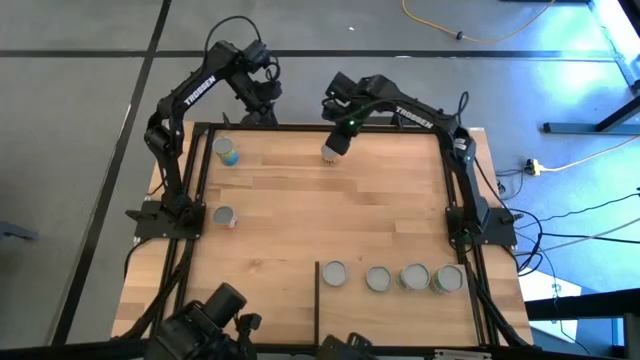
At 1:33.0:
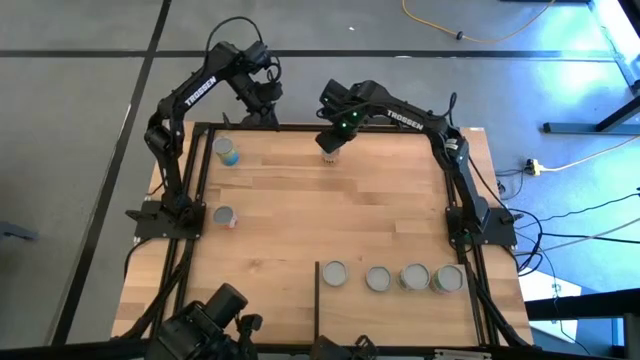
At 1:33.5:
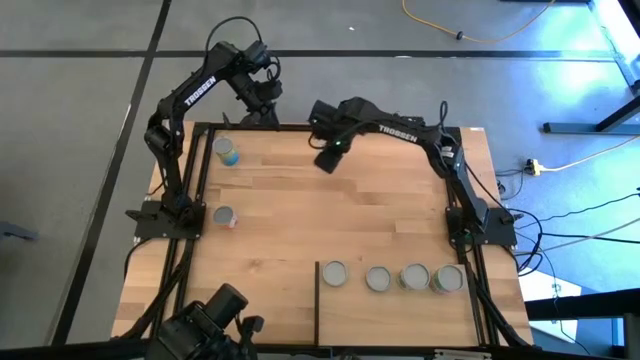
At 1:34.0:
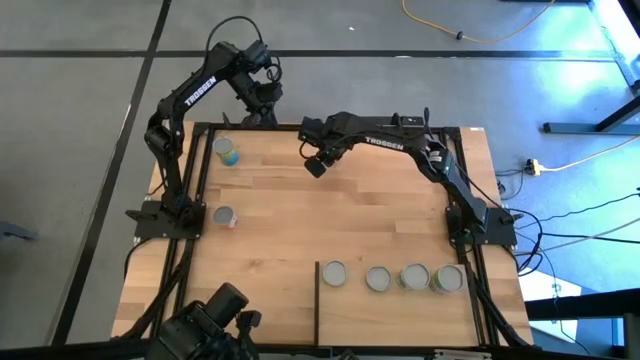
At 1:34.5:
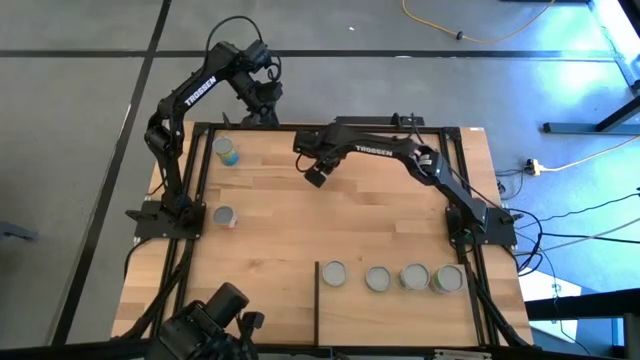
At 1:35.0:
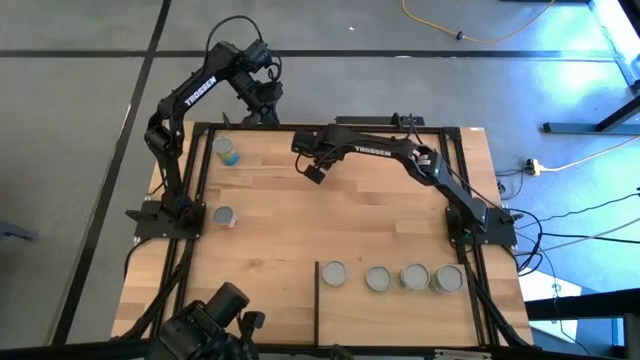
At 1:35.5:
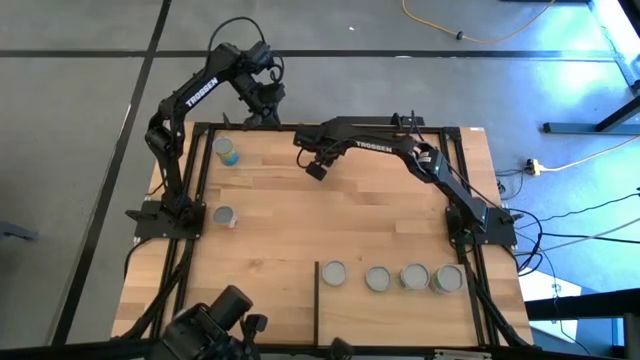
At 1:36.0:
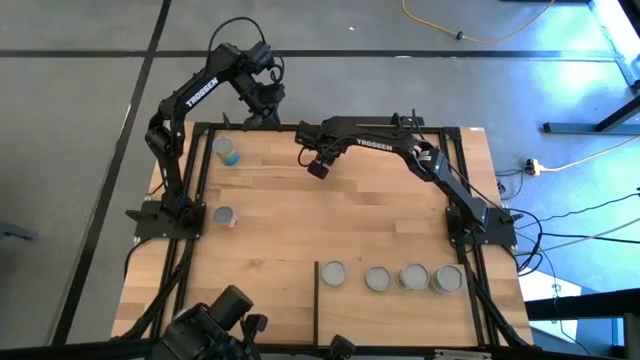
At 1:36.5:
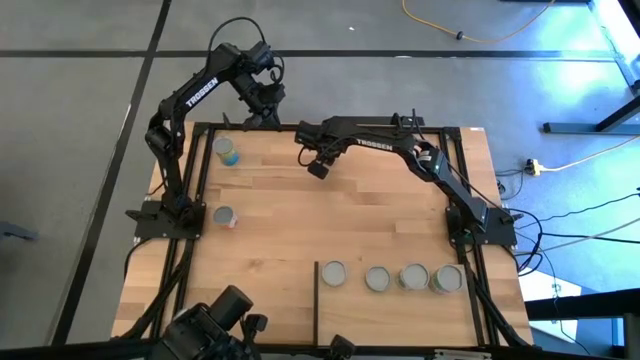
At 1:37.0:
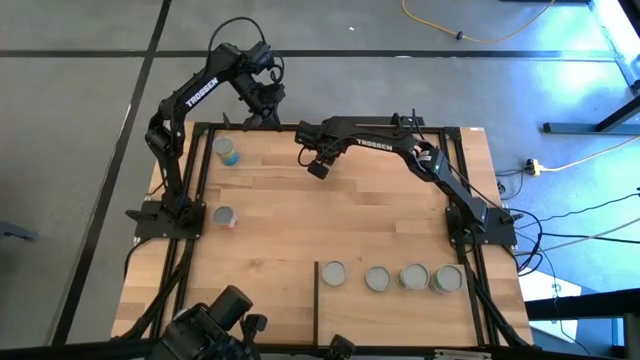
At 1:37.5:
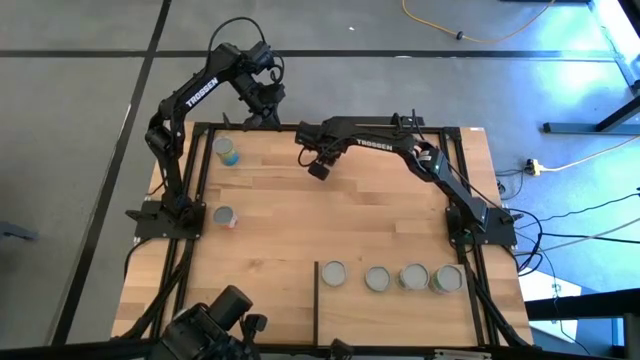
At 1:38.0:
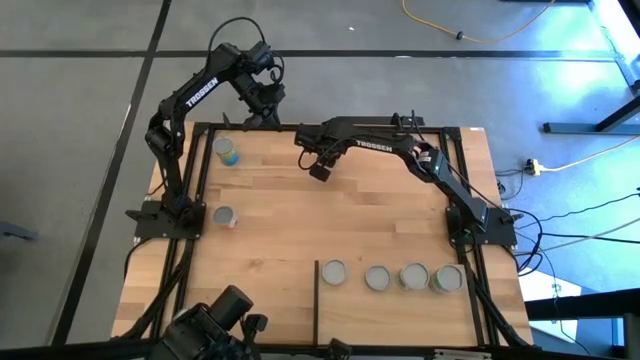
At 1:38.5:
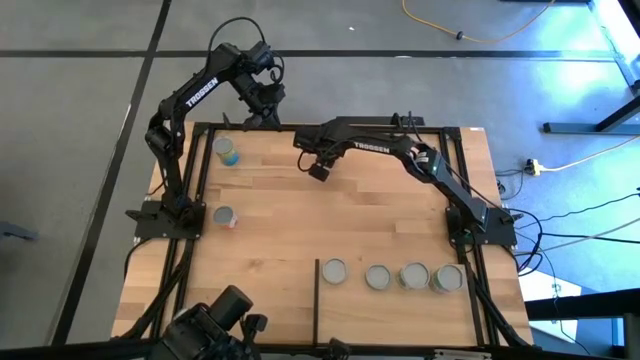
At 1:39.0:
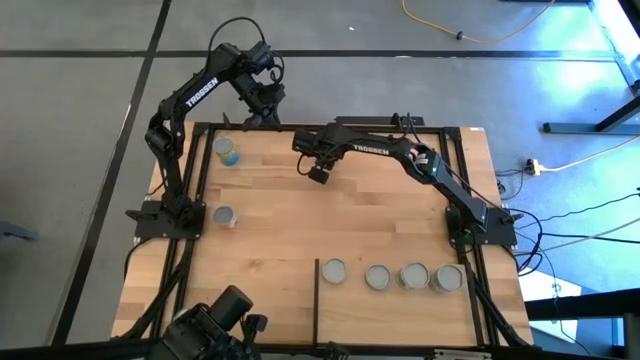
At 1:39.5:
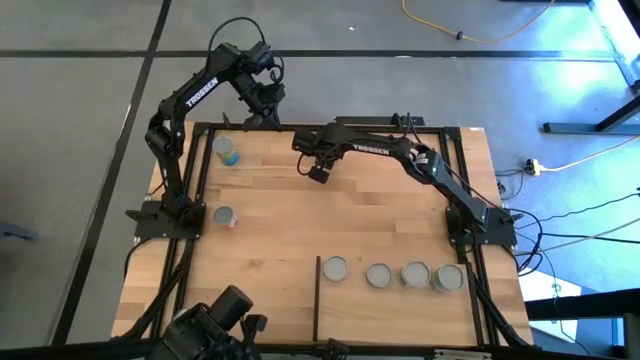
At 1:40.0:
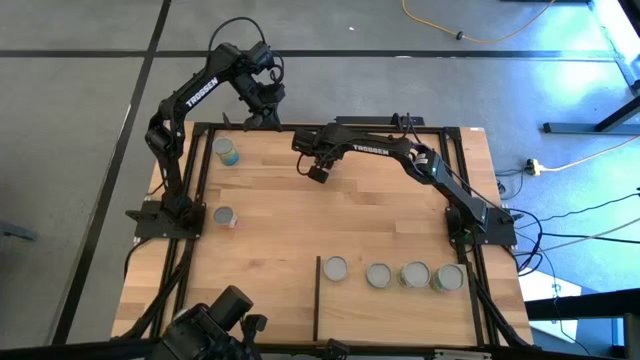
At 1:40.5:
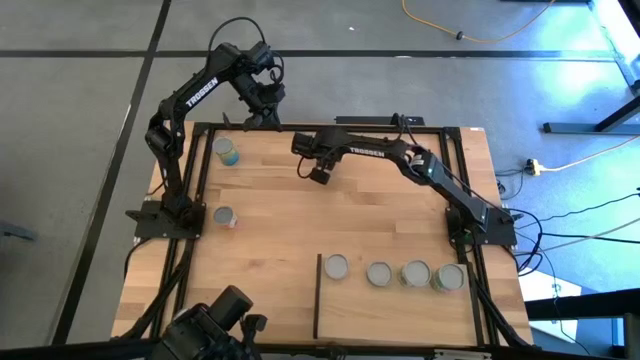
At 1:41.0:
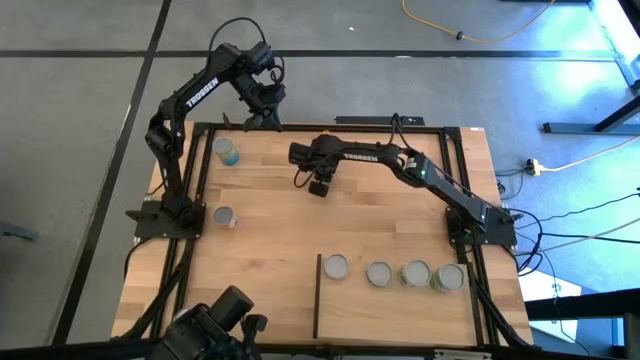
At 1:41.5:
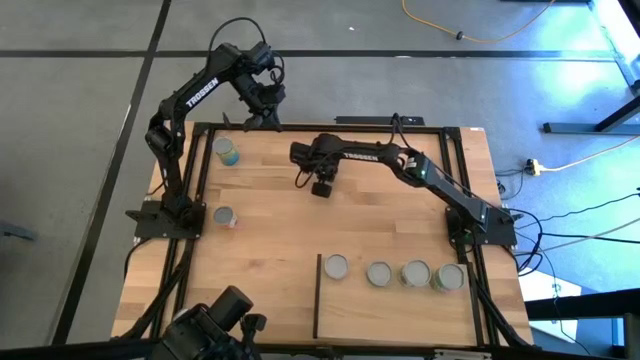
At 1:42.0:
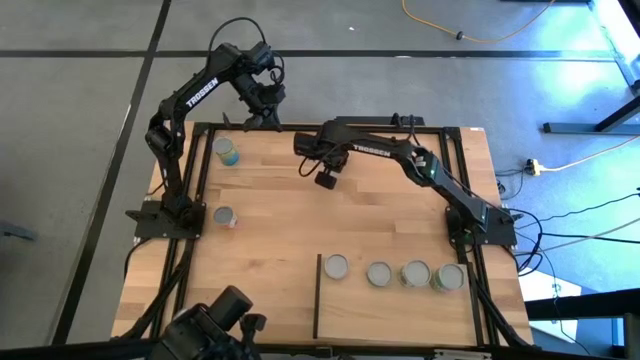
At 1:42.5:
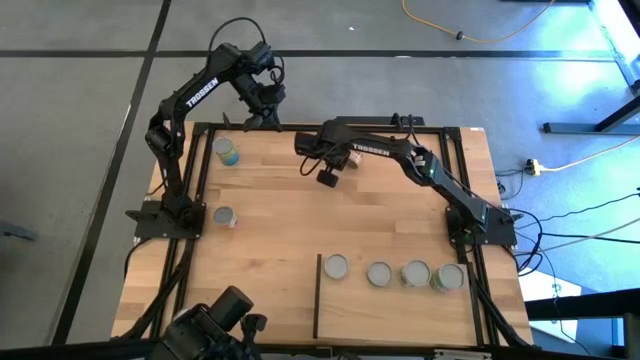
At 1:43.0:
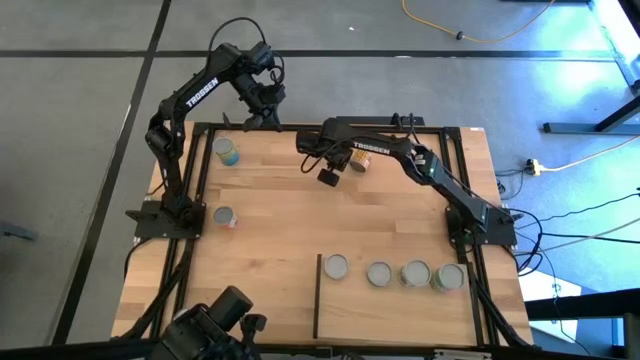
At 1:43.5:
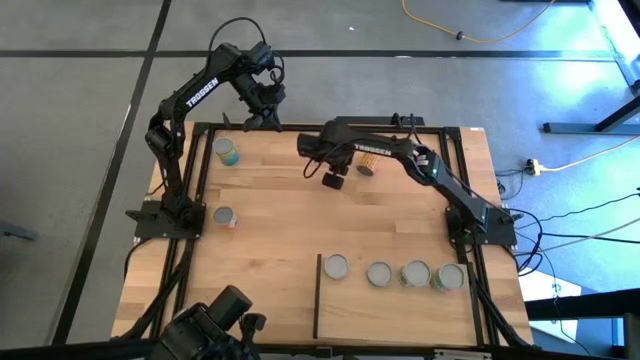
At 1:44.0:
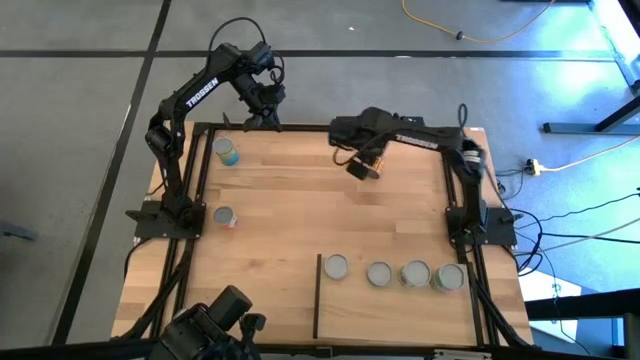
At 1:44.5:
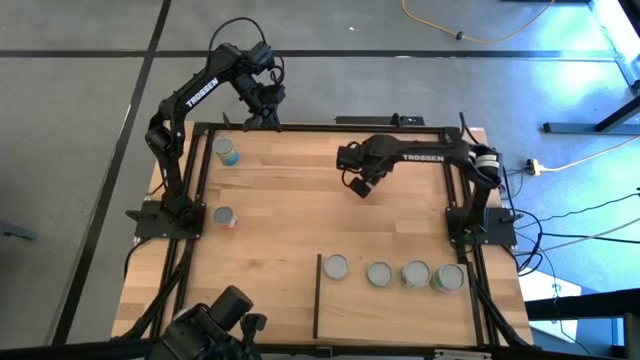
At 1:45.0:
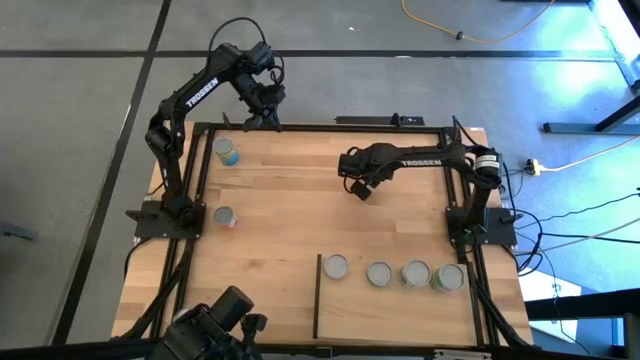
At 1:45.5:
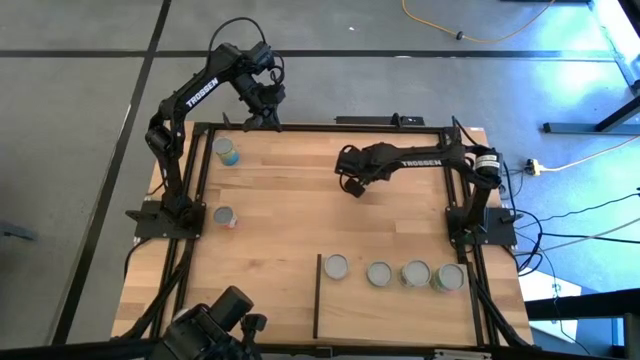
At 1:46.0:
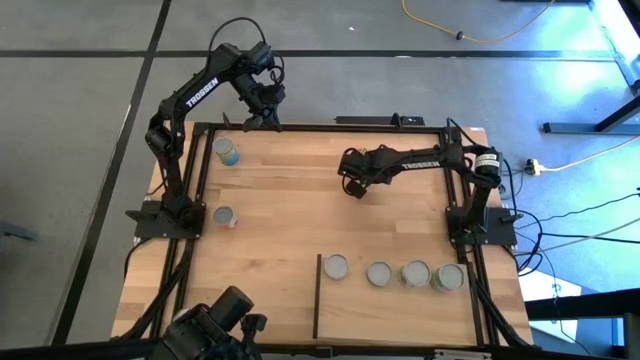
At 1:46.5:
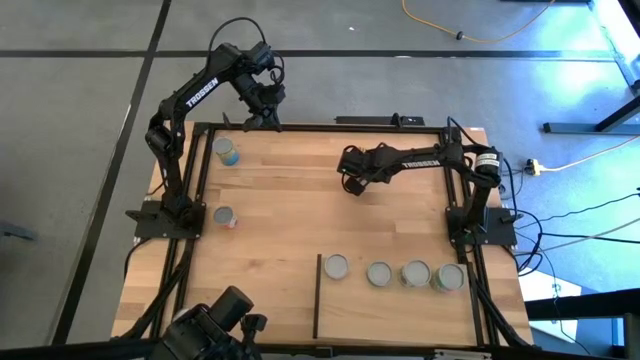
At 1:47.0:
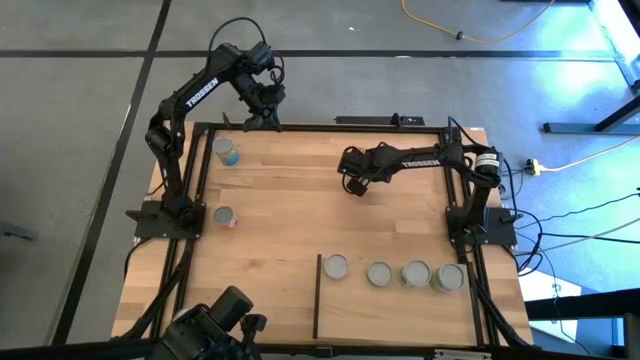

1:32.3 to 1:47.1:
Task: Pick and place cans onto a shelf
Put the yellow canned black beans on the shelf

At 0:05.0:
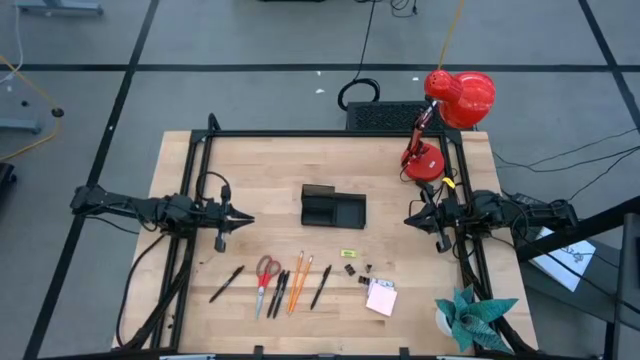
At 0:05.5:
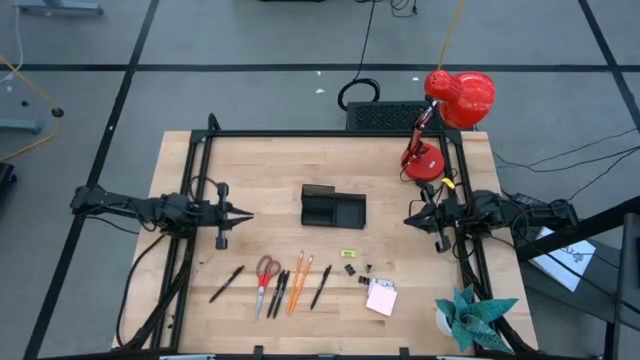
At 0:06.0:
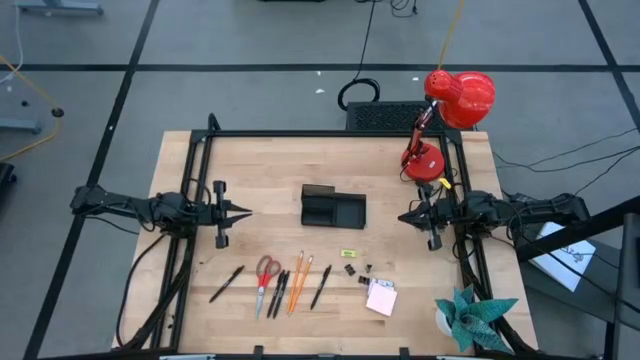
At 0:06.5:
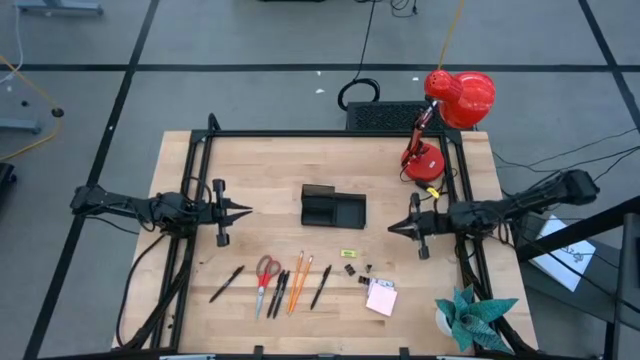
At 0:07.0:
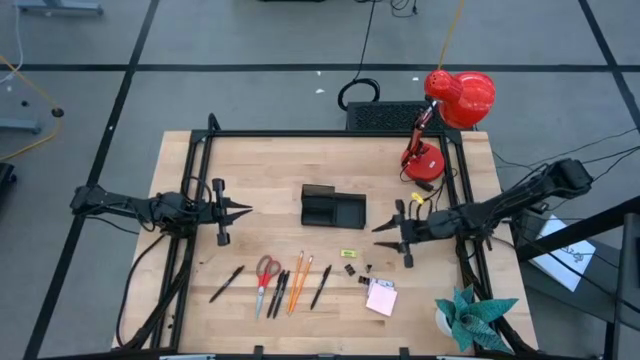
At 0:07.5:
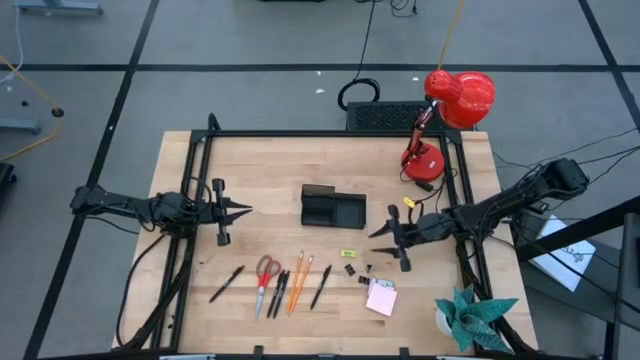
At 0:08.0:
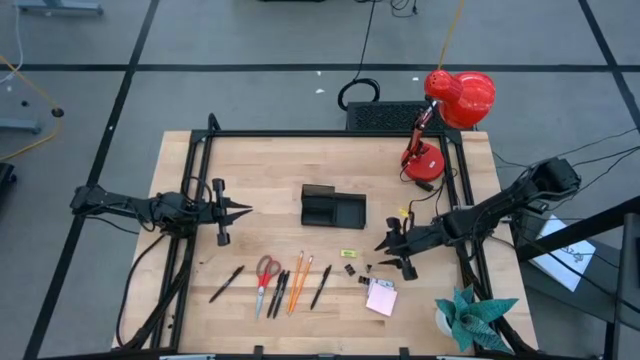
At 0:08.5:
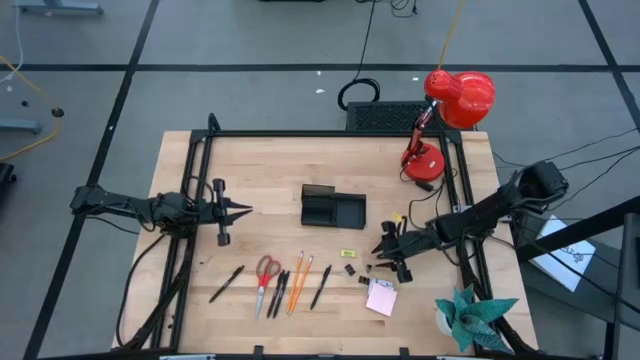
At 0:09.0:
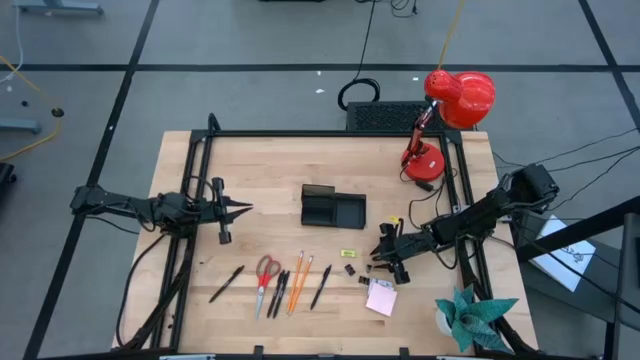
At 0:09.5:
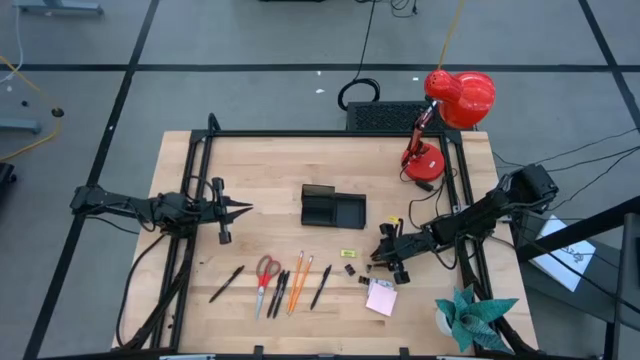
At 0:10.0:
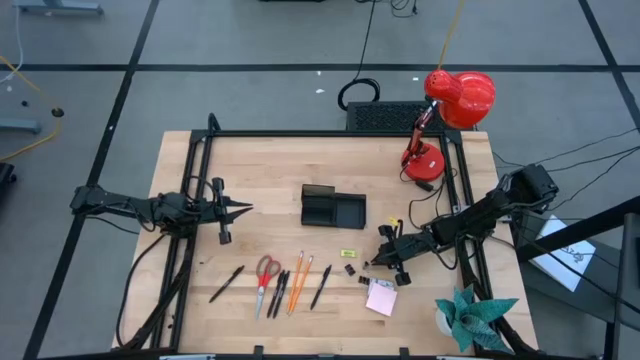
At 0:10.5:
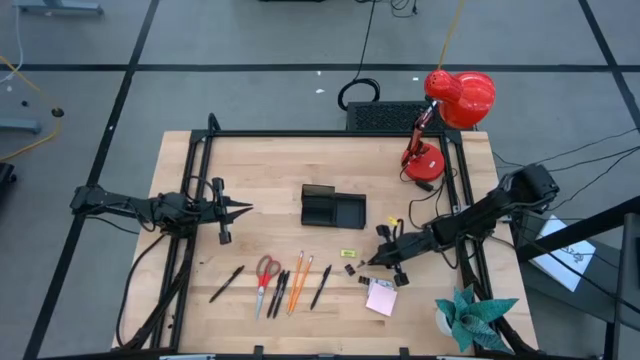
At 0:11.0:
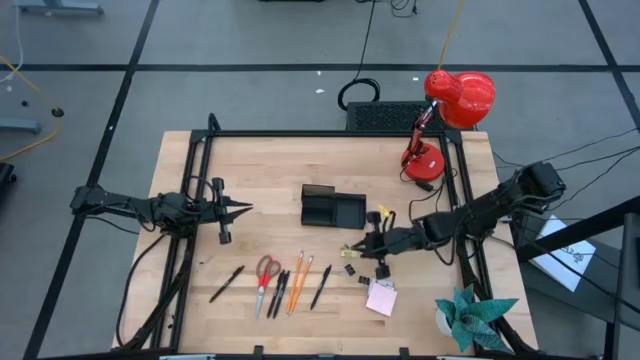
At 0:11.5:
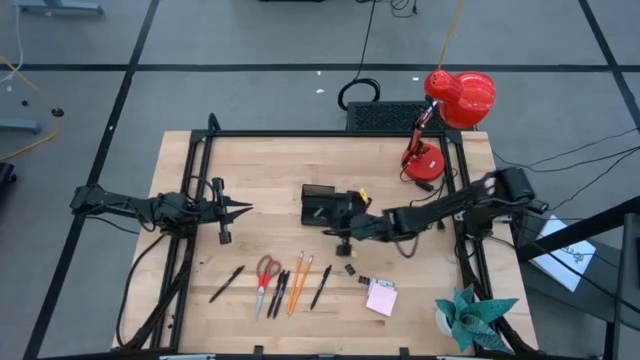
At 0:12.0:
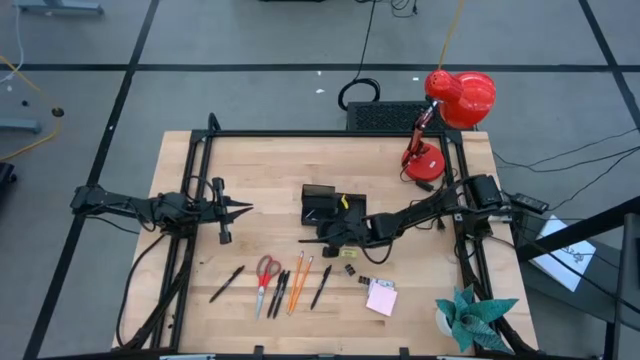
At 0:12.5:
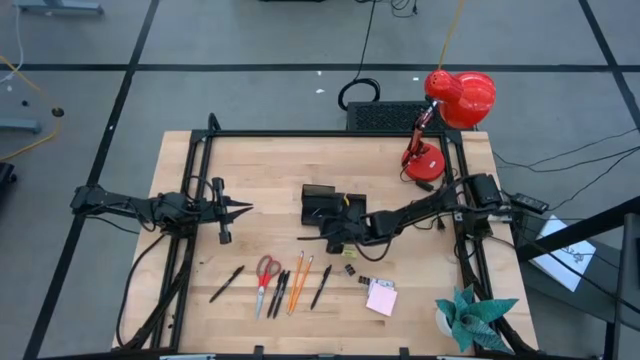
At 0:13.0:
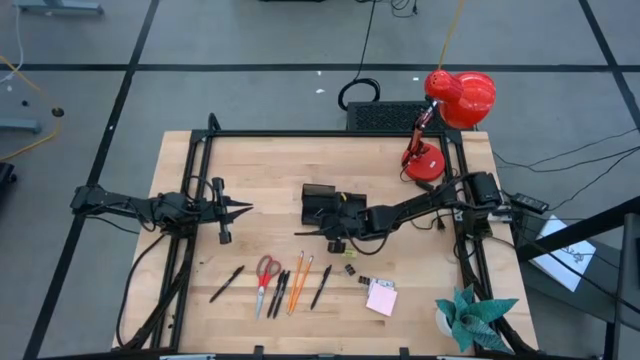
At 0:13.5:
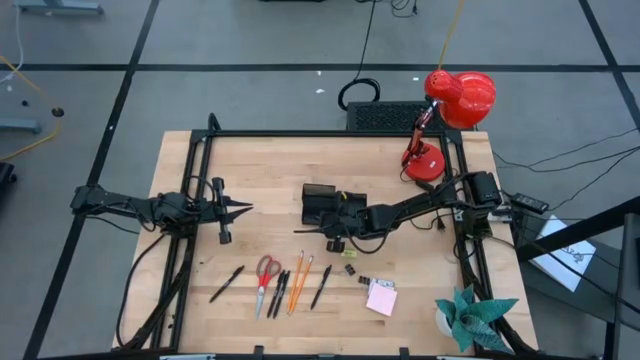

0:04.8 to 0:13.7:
Task: Pick and place office supplies into organizer
Put the binder clip into the desk organizer
